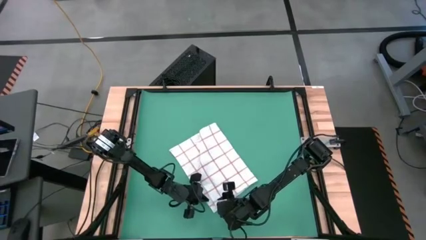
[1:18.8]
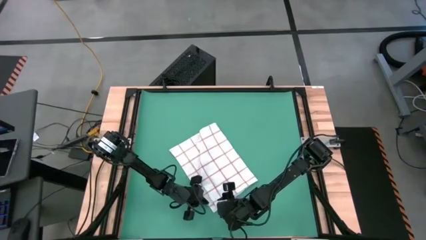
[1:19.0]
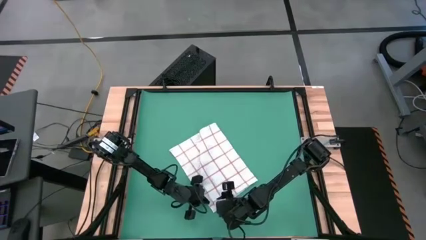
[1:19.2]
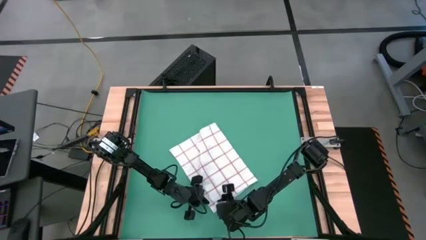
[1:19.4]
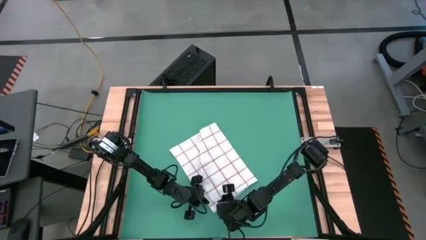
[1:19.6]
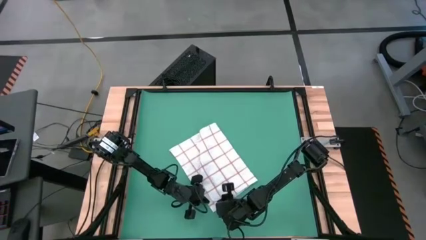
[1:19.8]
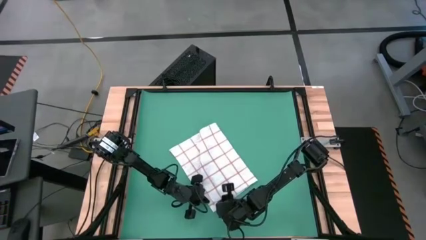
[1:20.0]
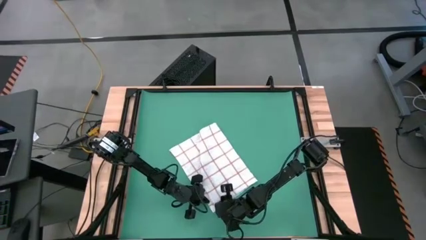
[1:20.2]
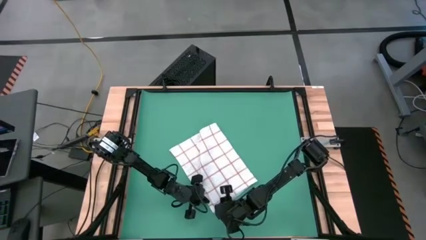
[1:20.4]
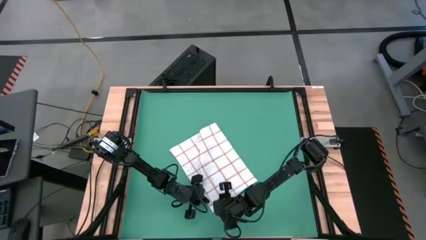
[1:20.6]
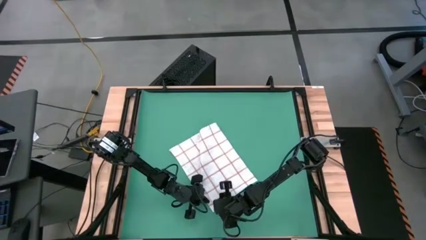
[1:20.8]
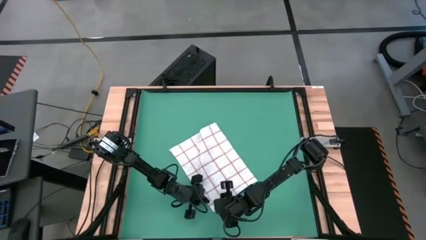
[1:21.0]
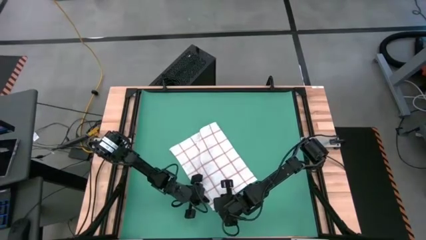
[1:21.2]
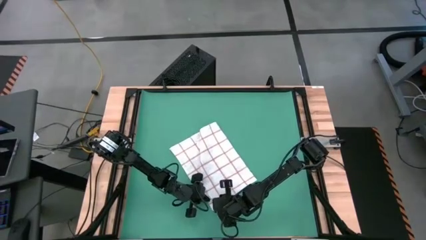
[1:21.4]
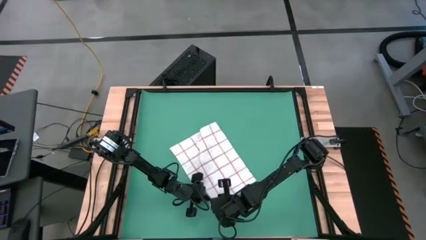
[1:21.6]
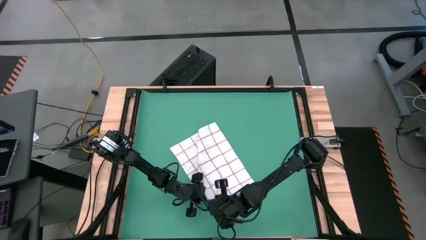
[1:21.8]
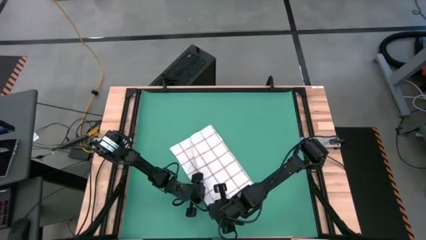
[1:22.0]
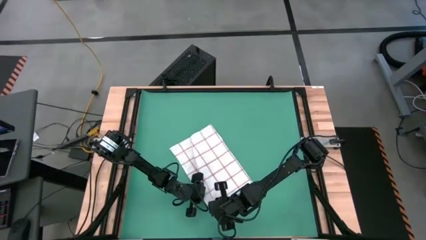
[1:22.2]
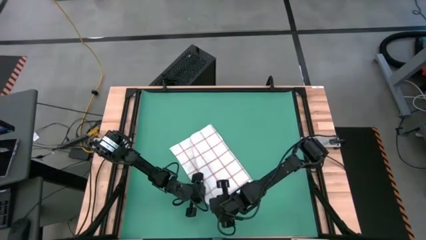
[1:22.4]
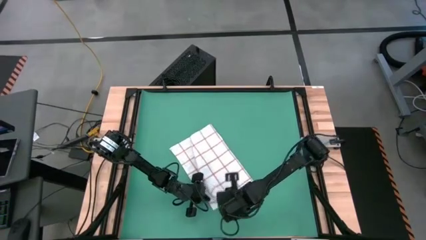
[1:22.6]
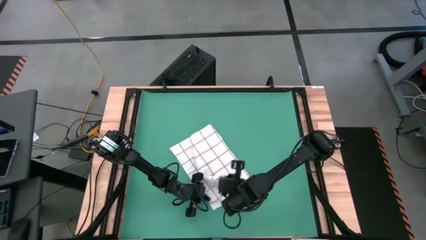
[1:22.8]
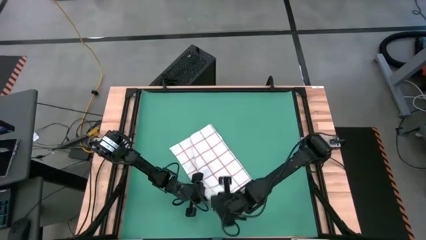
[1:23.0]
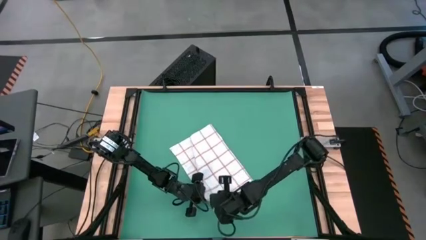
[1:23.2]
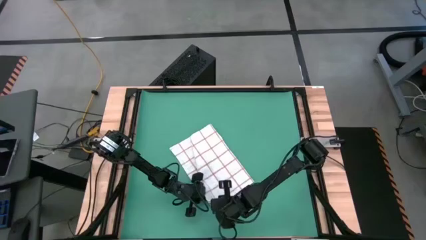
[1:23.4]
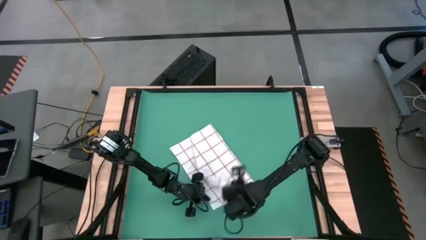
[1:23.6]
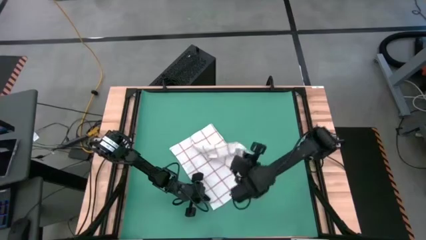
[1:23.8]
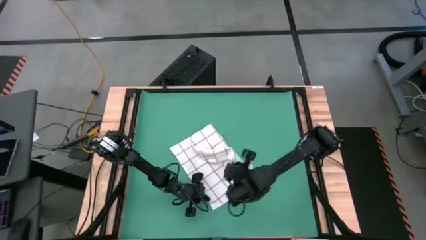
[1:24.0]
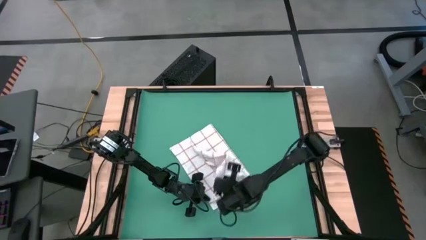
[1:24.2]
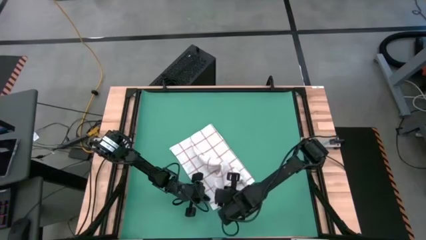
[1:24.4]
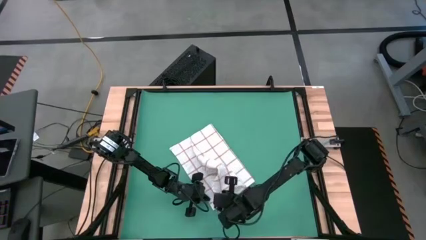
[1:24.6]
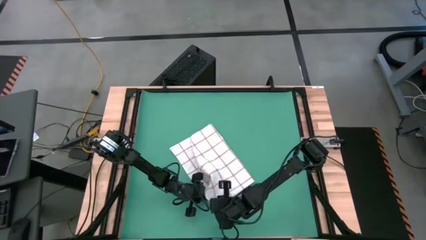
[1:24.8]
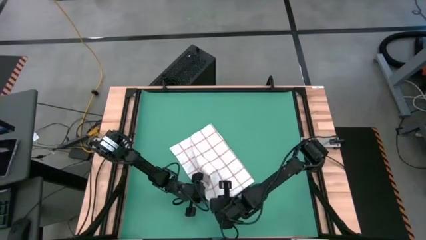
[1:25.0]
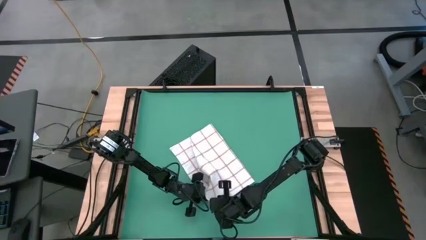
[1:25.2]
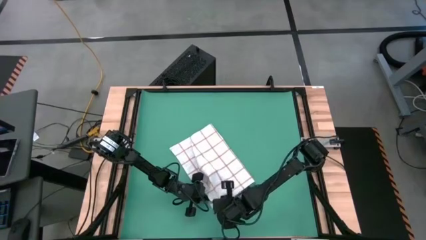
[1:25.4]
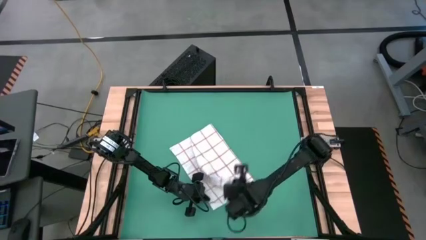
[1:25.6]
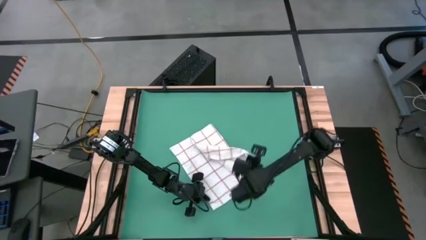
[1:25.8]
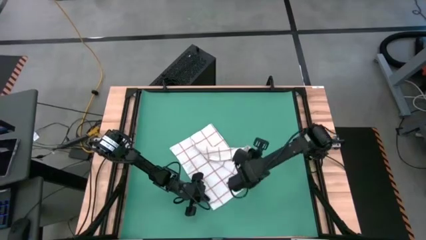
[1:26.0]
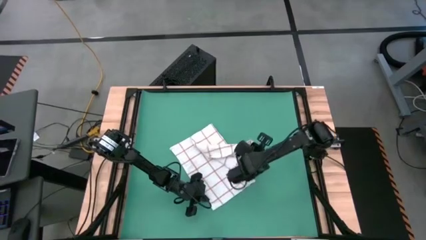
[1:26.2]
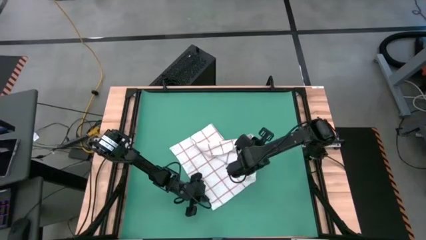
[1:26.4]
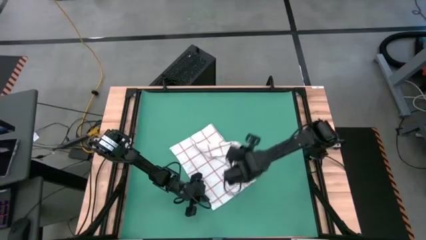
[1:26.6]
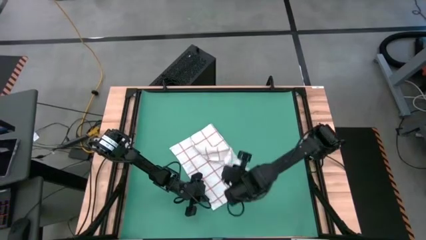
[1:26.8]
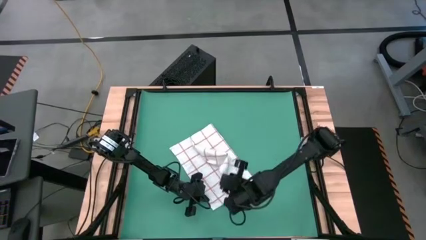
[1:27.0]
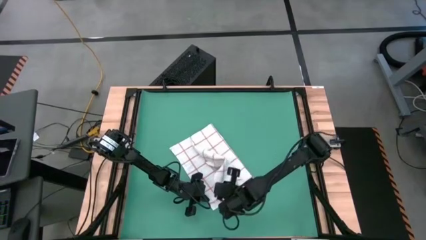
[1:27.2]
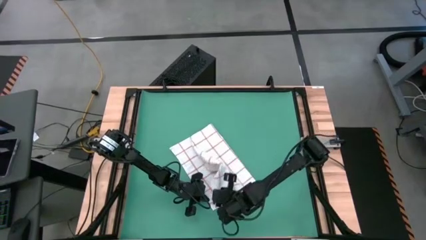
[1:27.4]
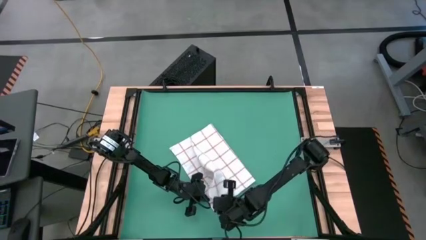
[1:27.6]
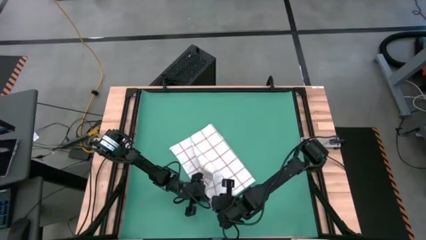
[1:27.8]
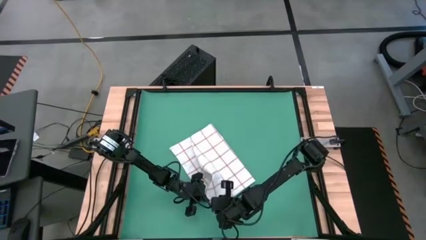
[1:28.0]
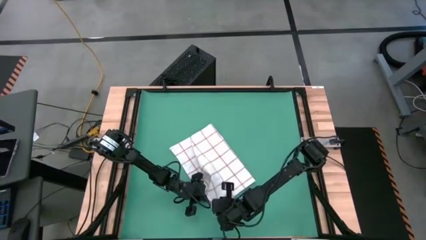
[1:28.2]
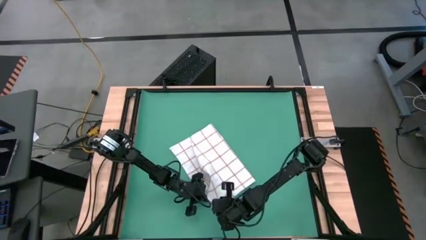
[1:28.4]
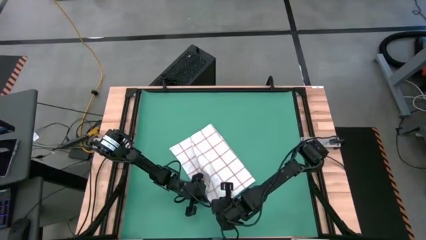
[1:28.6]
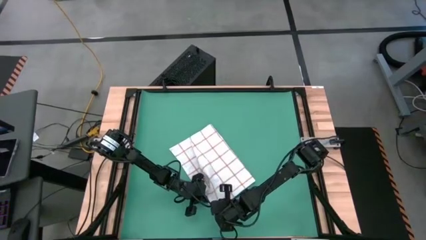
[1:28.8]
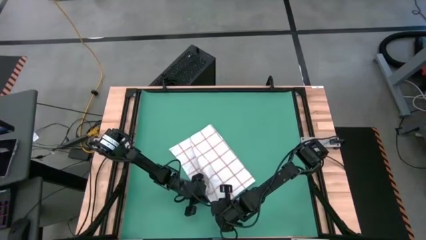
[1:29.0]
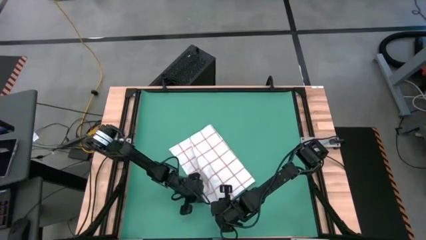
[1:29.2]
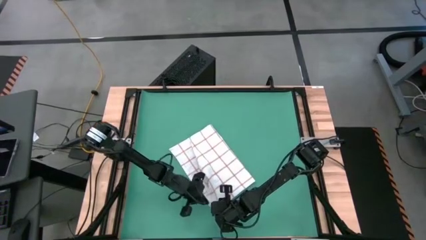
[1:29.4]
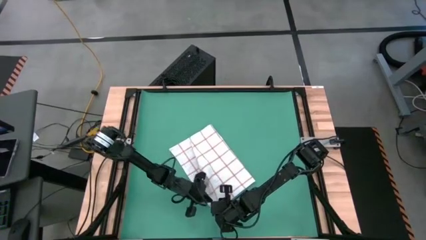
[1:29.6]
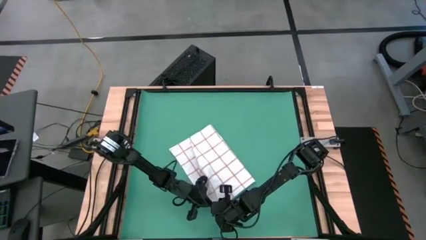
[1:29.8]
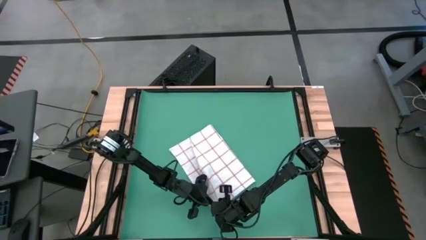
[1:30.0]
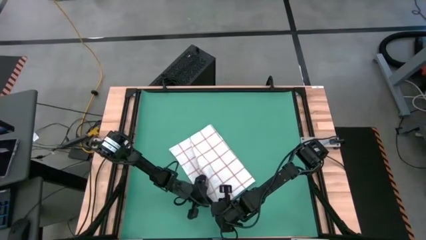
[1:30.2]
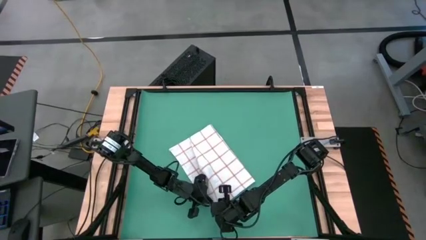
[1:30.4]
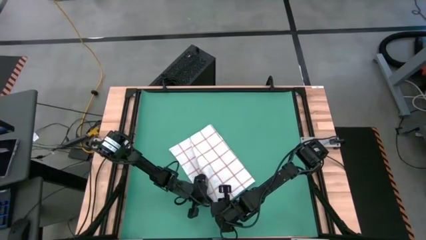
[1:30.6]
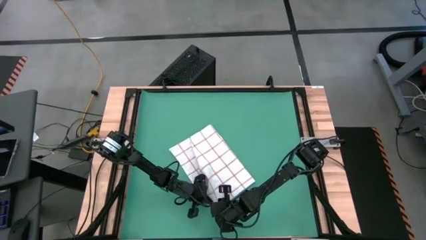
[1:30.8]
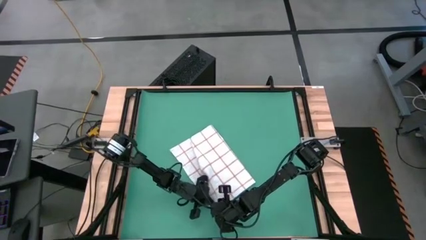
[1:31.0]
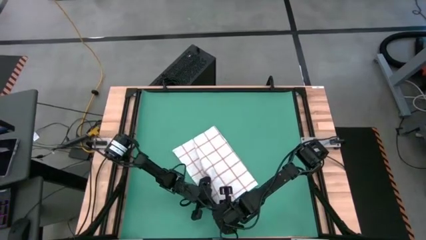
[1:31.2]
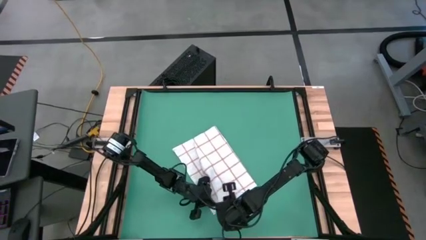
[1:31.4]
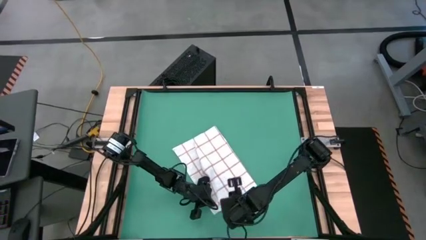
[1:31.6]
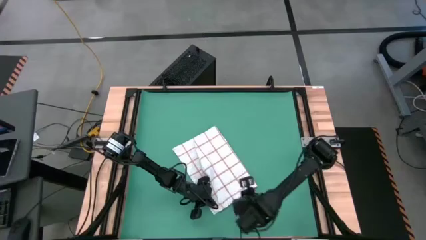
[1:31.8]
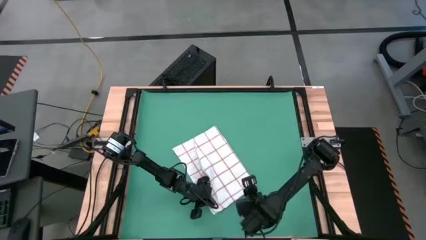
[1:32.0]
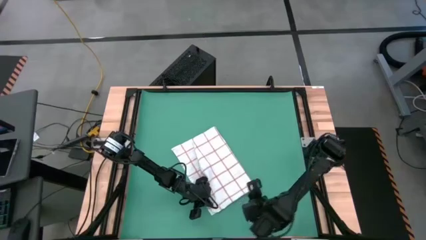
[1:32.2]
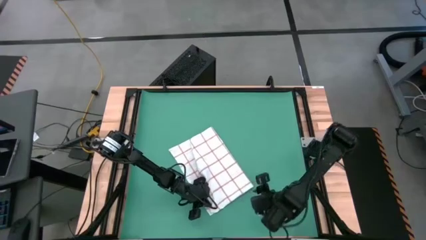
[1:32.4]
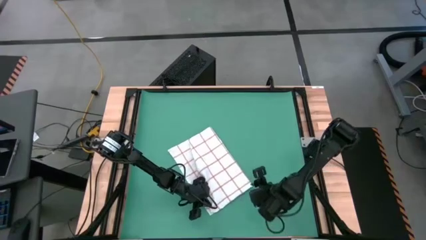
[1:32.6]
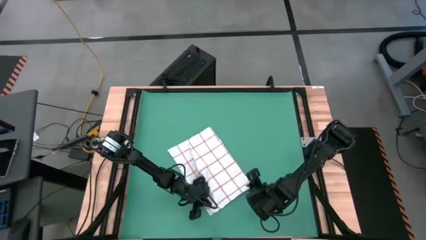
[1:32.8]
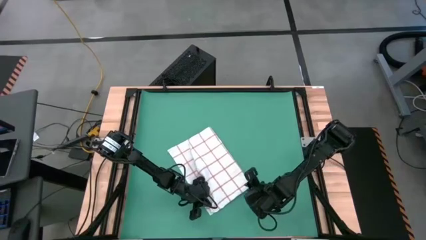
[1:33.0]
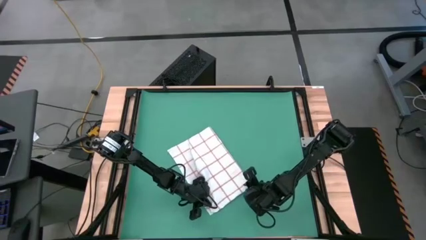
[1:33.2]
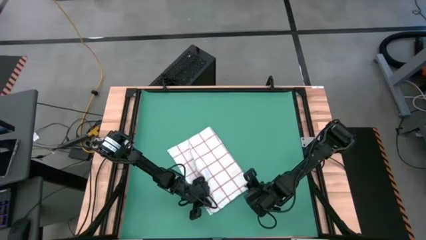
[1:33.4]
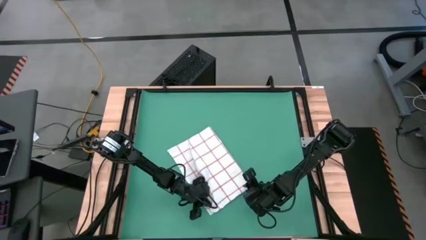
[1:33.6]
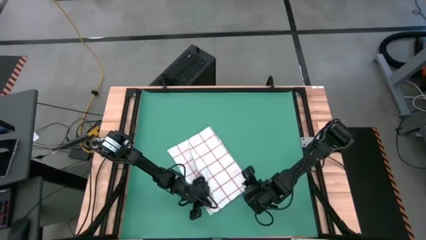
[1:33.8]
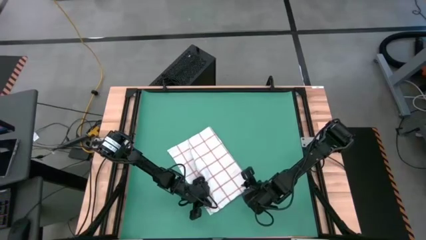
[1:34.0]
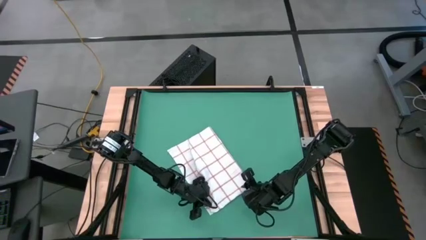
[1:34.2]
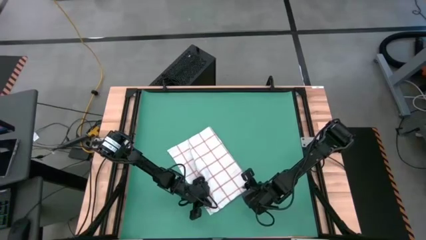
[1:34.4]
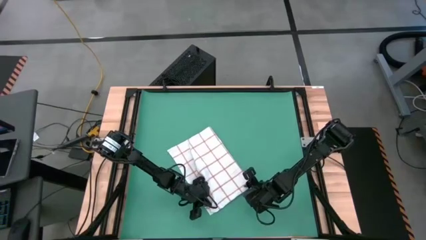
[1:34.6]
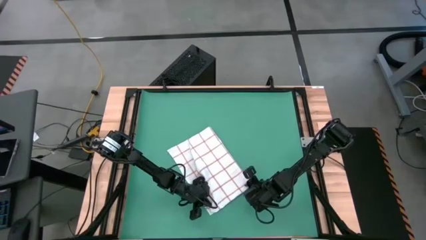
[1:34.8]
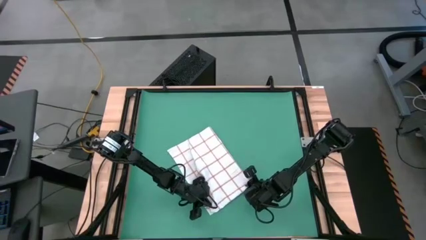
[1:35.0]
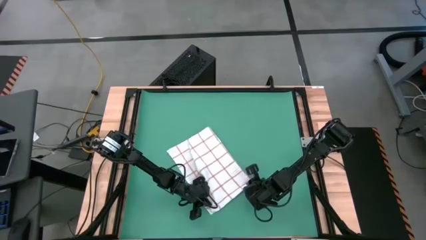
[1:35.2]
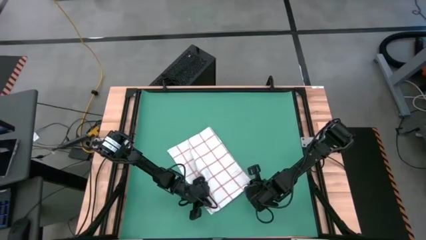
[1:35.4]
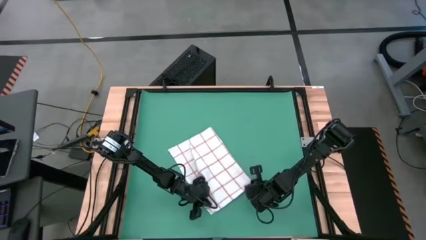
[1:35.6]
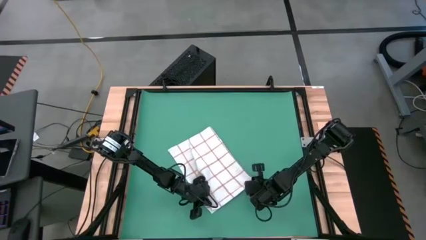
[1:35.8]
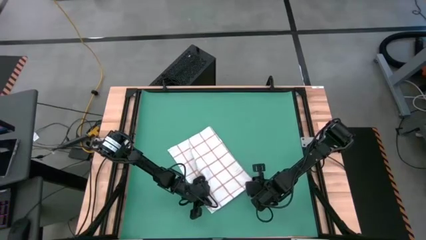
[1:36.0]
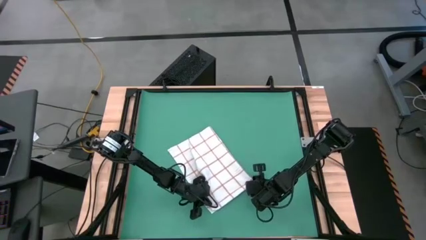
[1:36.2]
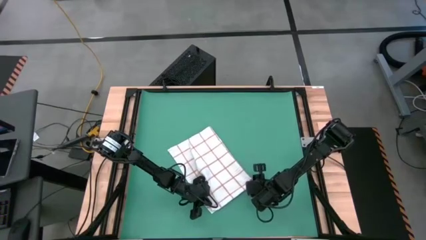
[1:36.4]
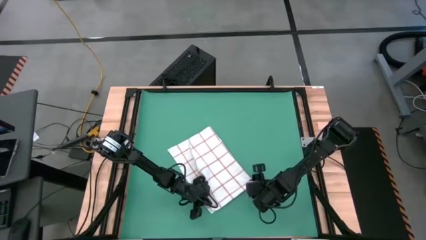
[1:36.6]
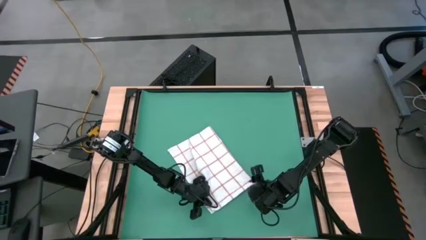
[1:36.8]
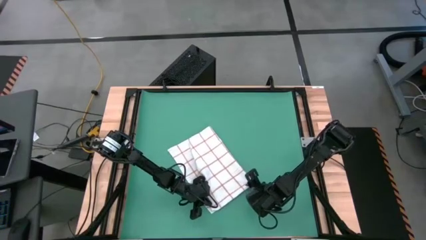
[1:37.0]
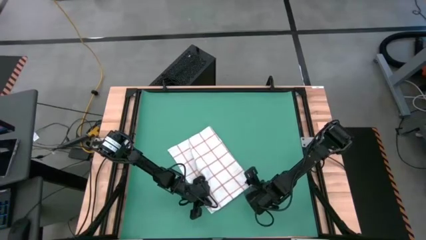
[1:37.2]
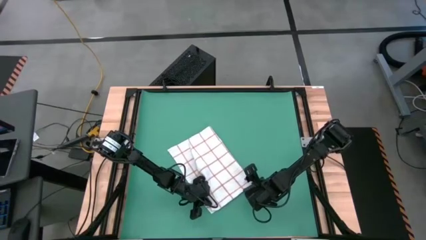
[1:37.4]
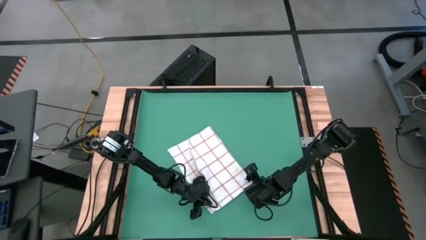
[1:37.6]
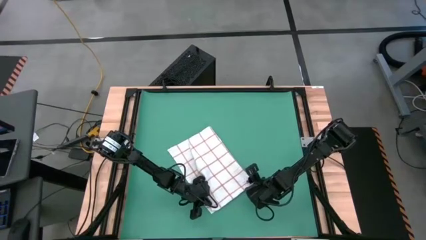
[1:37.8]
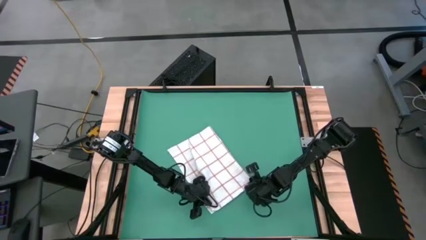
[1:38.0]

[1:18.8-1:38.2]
Task: Roll towel into tight, uniform cylinder
Roll the white towel
